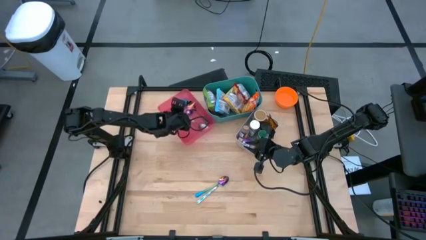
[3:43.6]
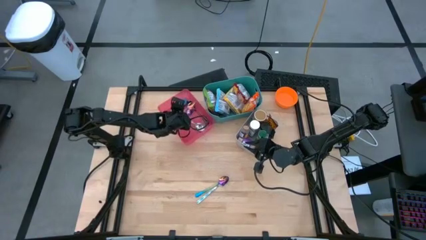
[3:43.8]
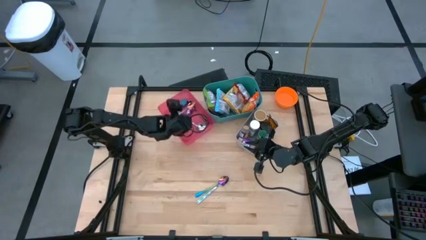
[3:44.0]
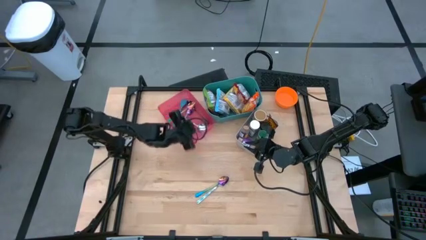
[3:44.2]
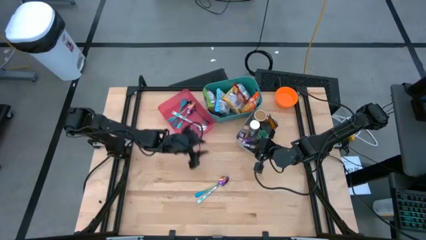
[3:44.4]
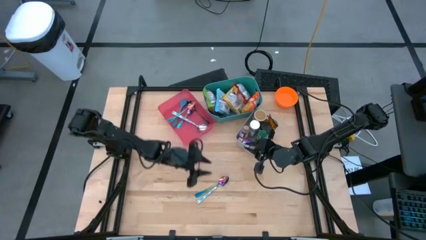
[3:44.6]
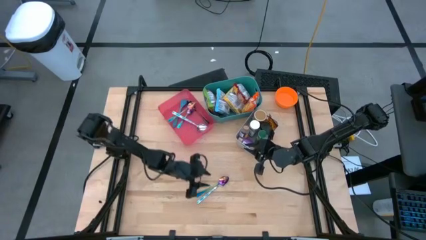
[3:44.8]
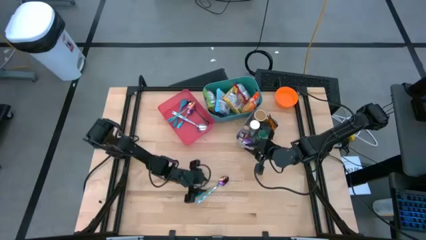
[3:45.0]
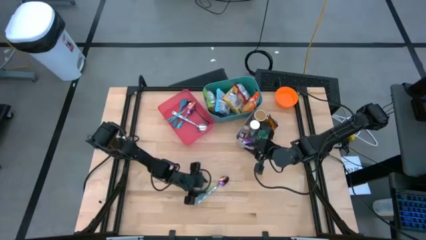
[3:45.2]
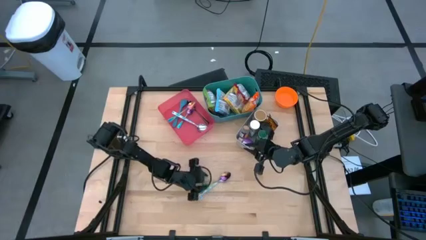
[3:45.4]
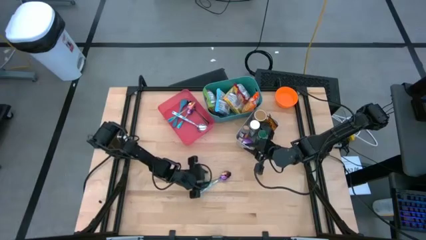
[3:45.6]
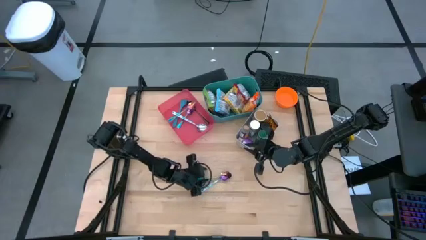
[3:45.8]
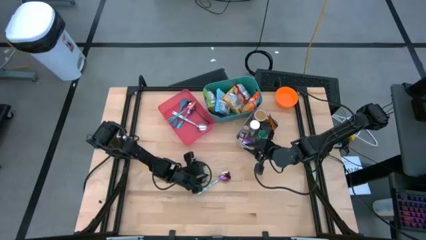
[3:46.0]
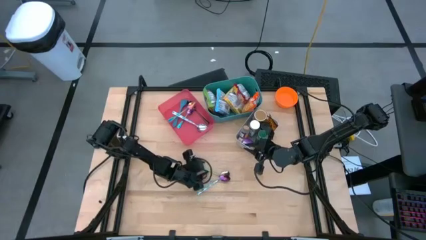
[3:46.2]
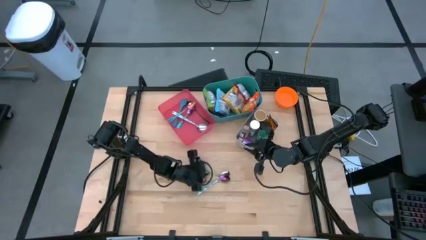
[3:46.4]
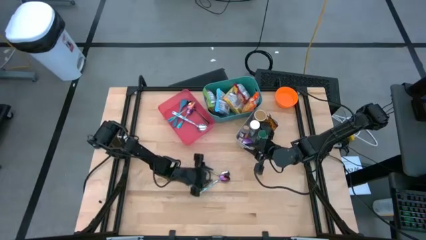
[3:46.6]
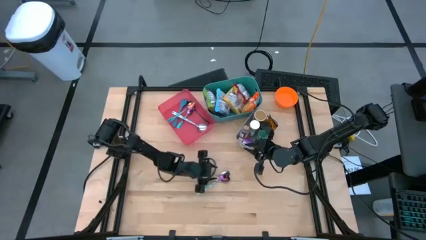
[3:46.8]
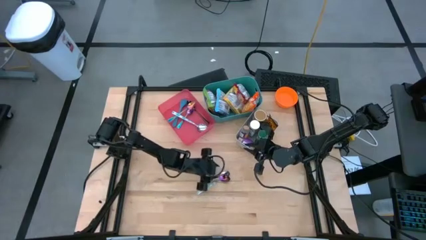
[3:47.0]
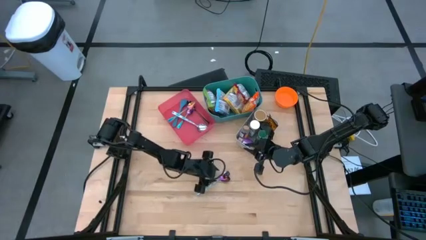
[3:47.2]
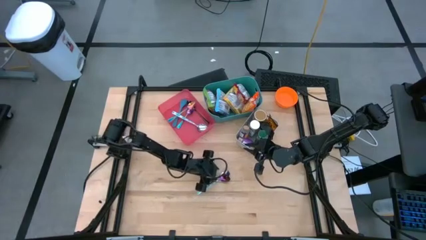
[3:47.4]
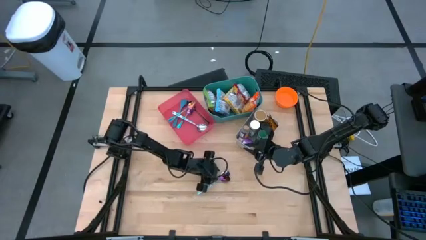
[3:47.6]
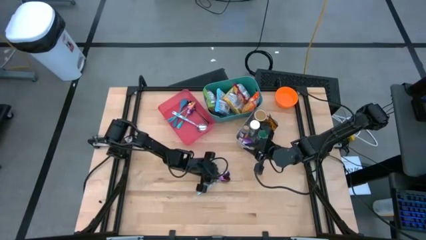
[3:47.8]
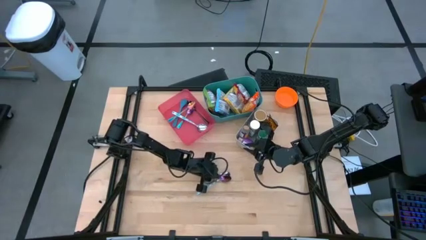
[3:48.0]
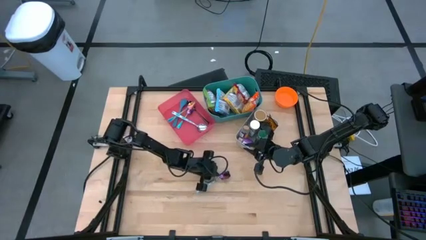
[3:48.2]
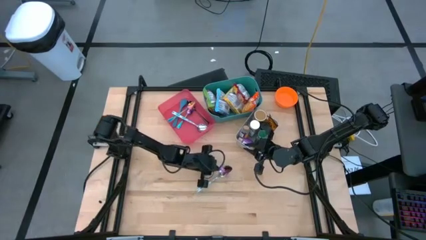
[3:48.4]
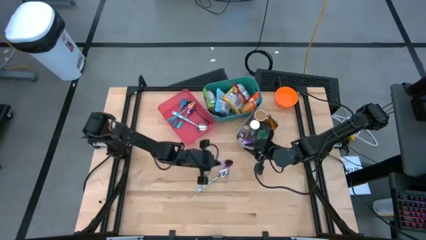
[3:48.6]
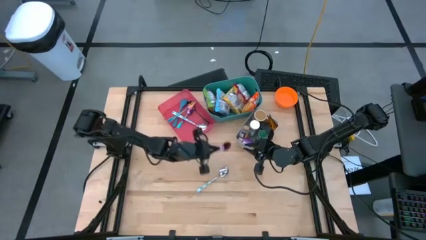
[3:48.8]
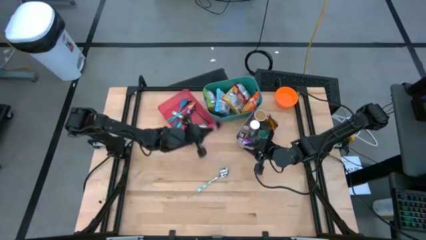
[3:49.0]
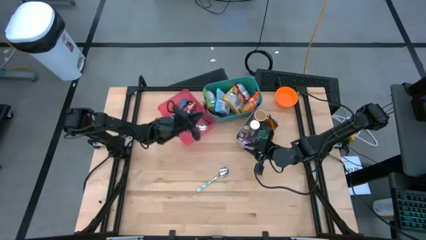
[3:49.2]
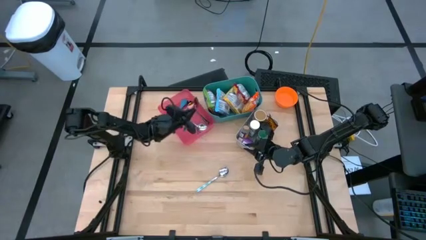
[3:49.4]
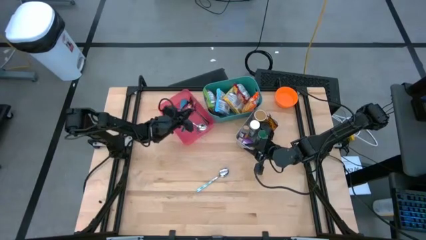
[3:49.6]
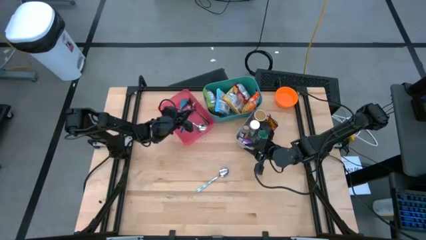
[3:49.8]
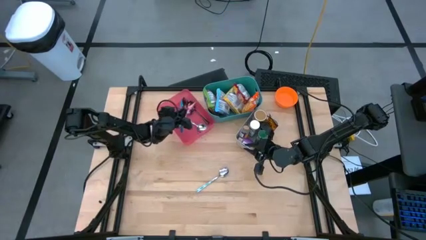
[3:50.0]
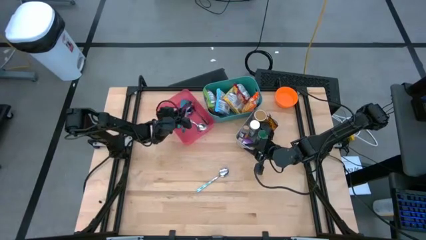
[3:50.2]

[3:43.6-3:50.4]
Task: Pick & Place Food Item
Put the purple spoon into the red bin

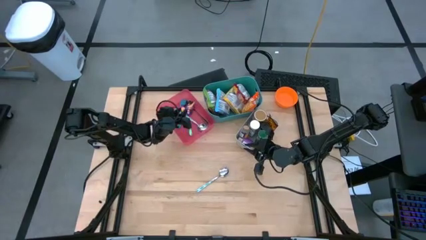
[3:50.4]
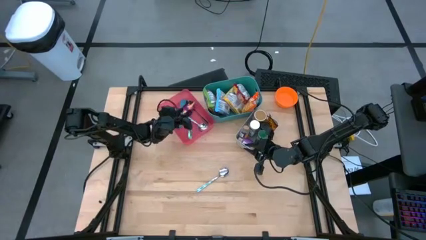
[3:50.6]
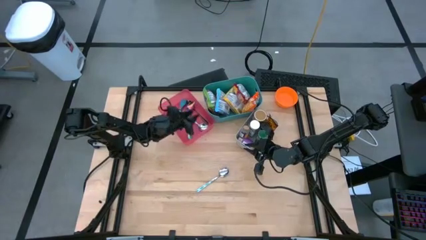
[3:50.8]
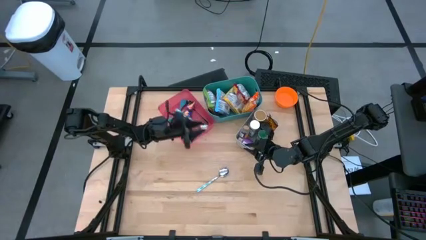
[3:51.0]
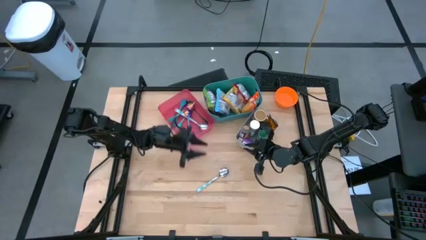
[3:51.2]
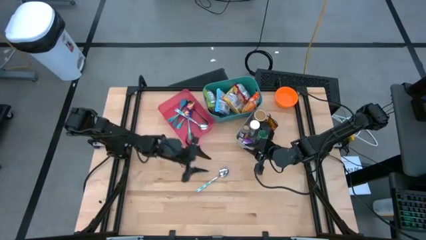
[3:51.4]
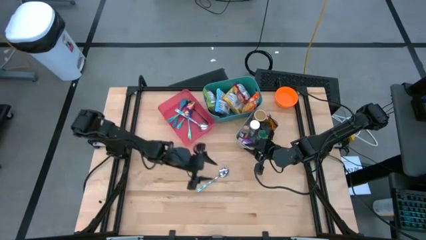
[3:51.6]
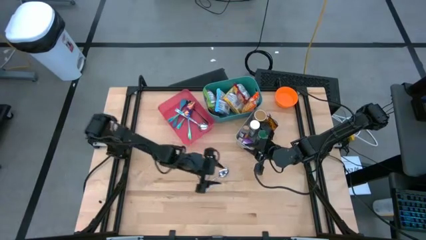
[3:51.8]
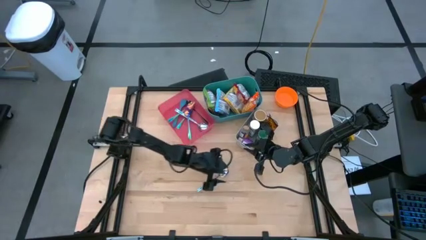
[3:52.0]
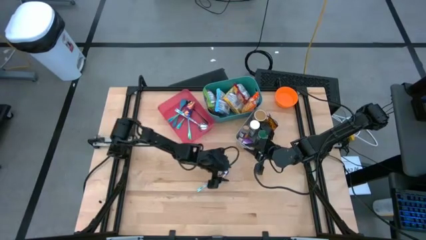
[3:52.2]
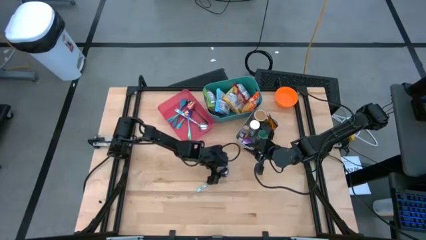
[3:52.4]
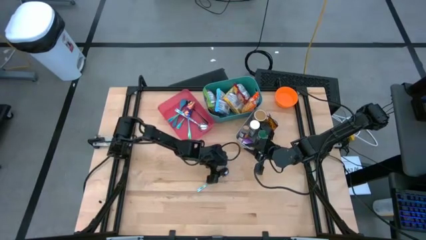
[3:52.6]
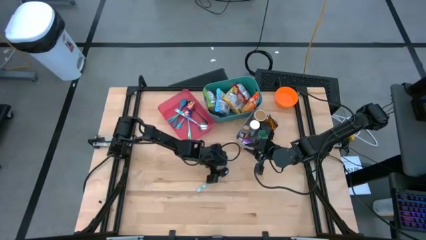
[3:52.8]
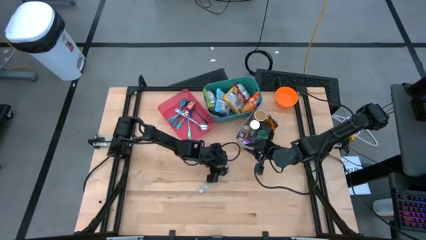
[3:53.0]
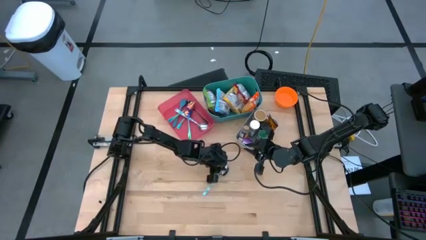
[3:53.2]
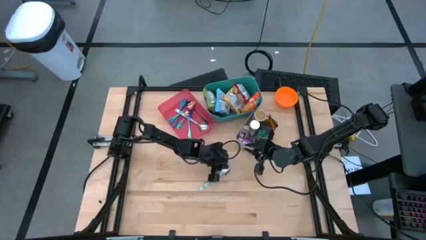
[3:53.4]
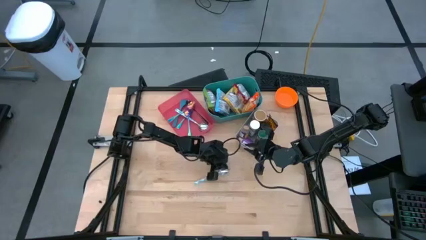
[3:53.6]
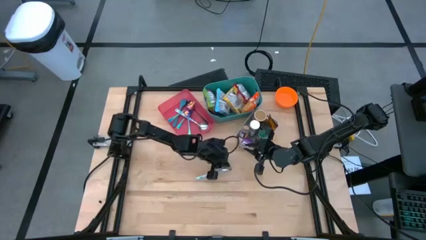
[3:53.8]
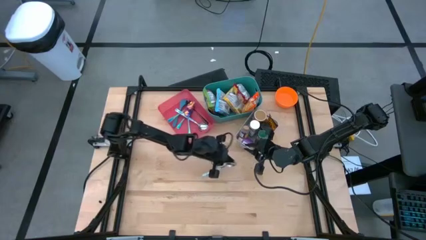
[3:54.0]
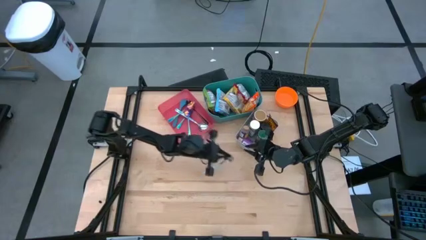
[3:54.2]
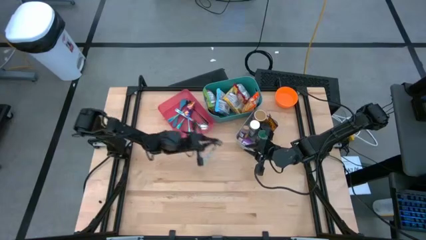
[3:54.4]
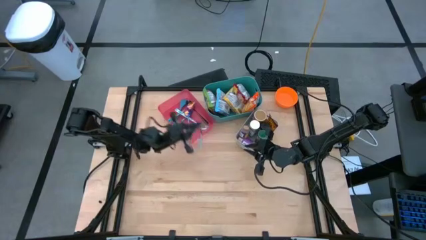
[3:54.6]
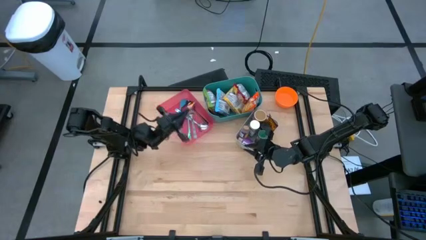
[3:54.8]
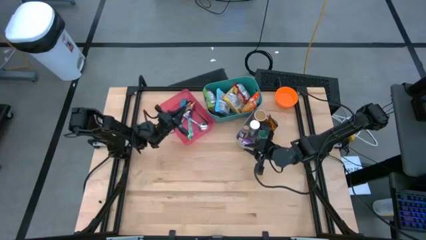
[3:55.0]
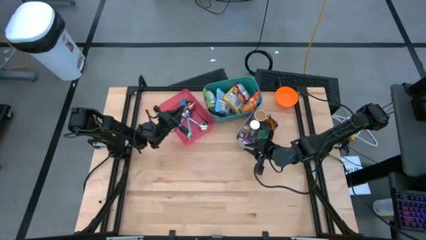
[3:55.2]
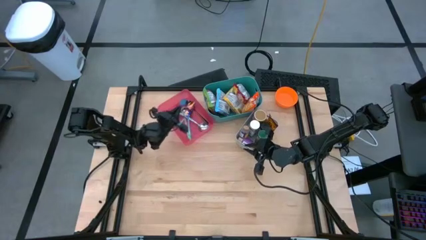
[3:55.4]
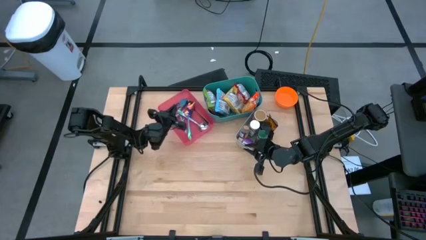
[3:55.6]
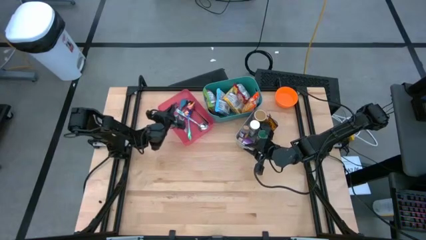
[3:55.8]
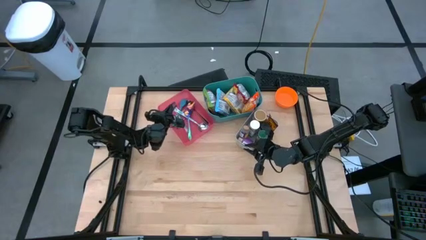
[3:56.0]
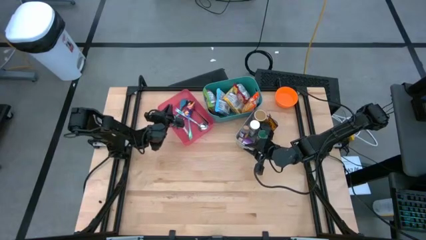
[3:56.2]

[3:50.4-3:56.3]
Put the silver spoon into the red bin

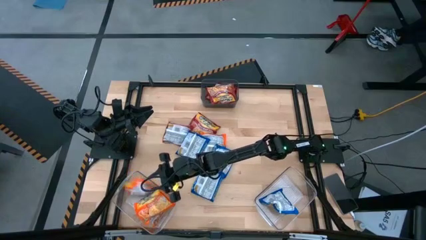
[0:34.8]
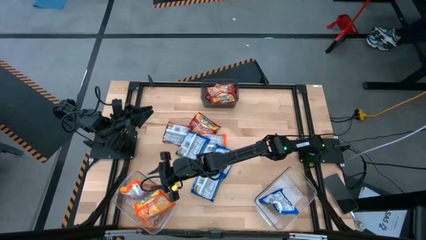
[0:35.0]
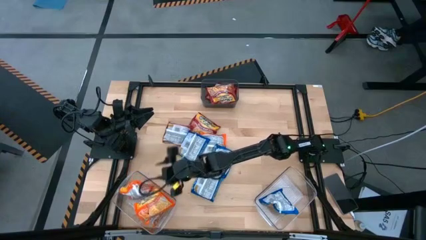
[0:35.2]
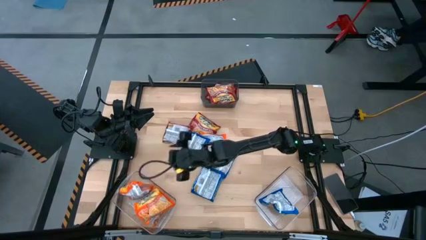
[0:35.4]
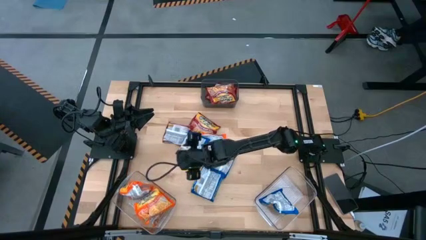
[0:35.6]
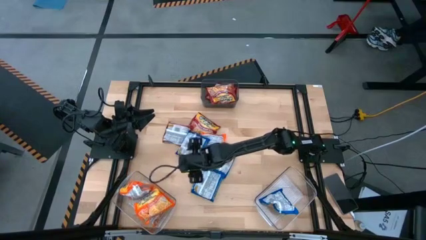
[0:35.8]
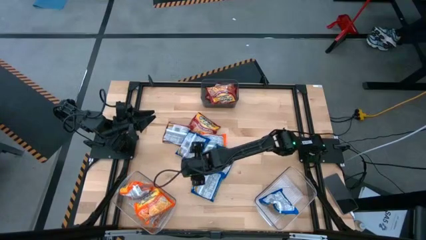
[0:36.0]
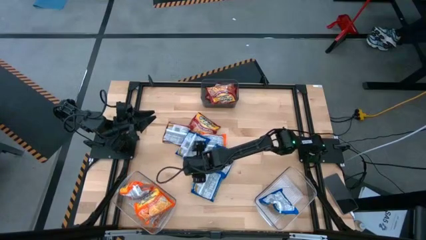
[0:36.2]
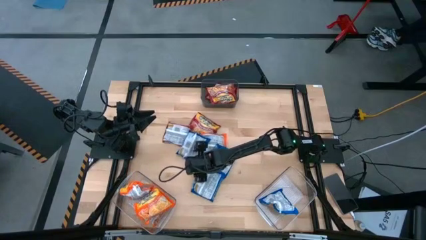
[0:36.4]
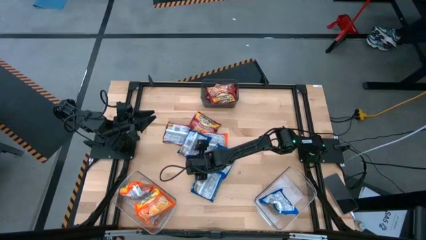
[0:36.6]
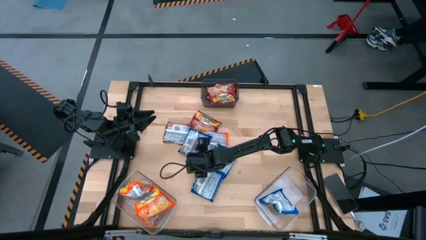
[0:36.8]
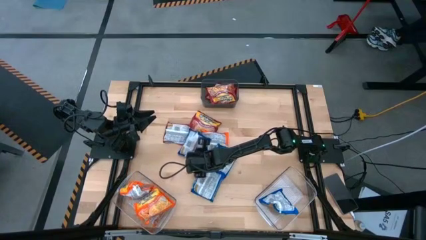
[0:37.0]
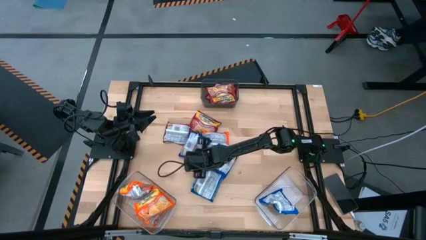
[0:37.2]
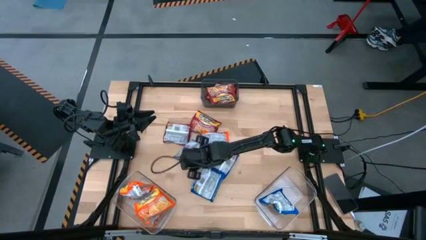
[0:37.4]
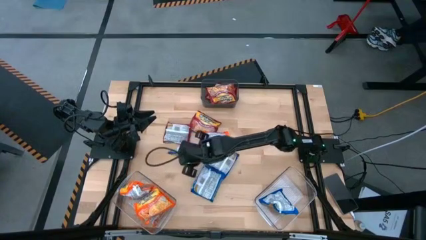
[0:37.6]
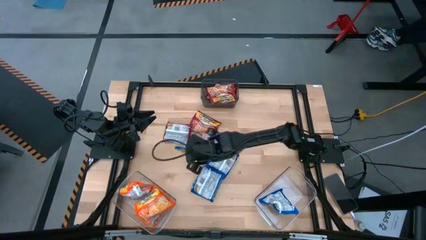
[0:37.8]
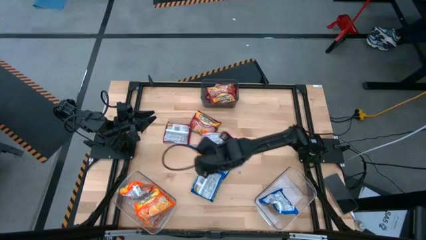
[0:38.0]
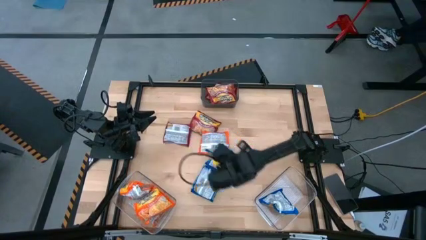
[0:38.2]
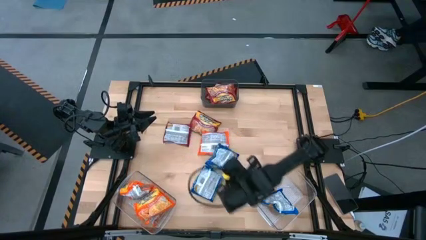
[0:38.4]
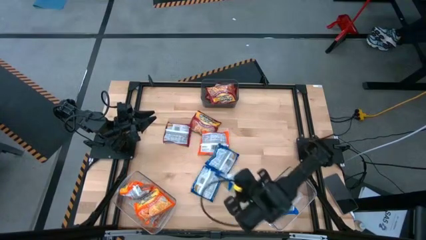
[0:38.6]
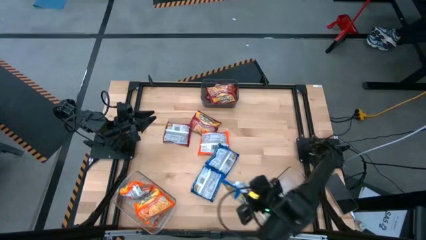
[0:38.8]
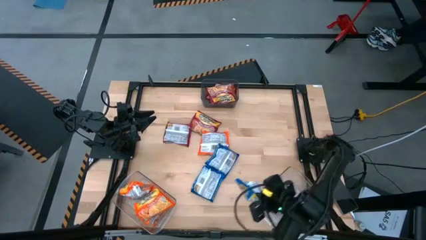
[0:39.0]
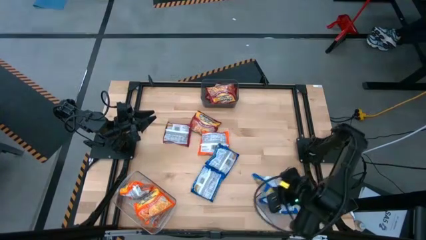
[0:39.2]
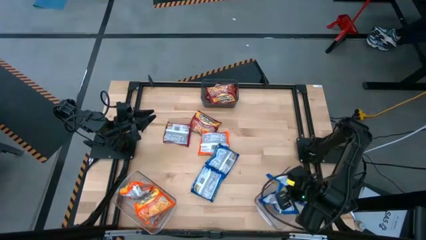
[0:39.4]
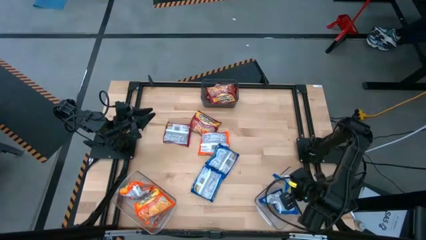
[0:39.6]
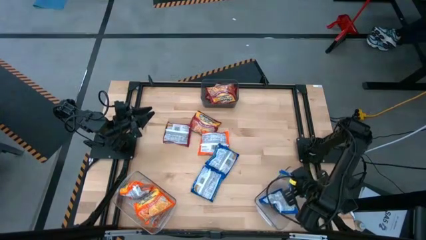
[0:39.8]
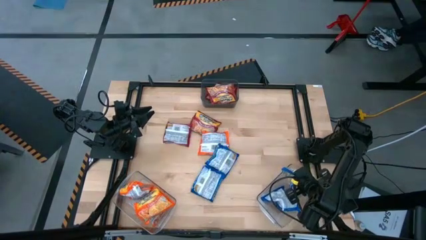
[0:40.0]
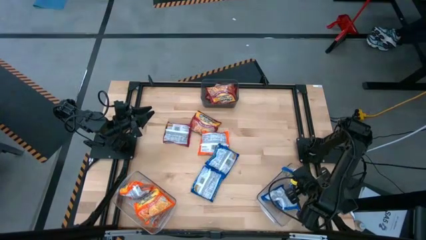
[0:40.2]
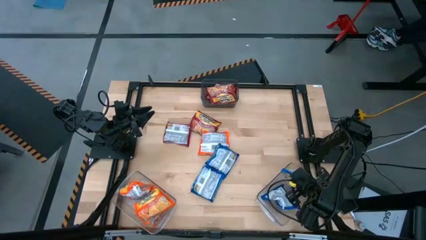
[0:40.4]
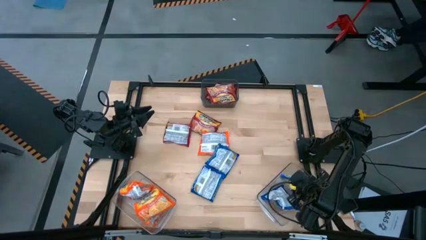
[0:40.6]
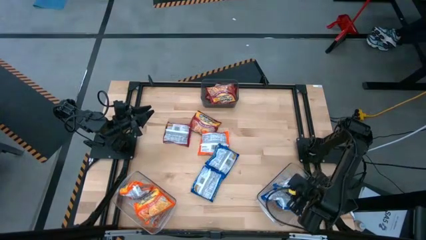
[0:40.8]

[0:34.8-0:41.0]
Task: Sort Maruchan noodles
Put the blue noodle pack into the right transparent bin
